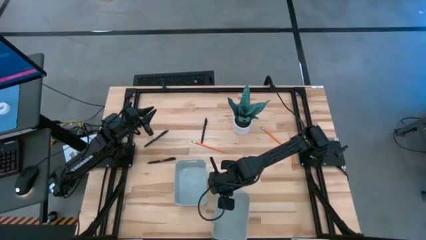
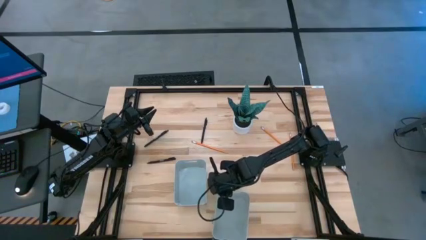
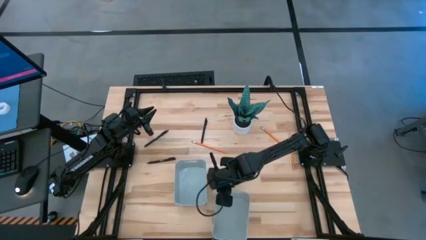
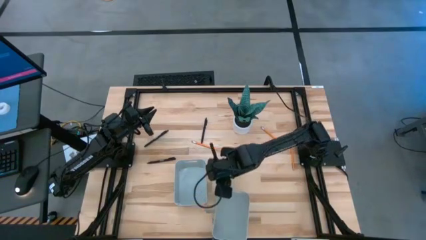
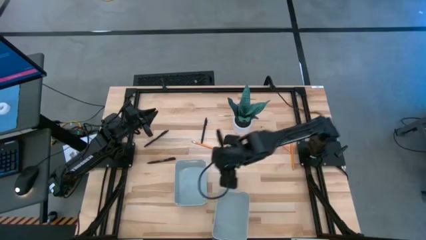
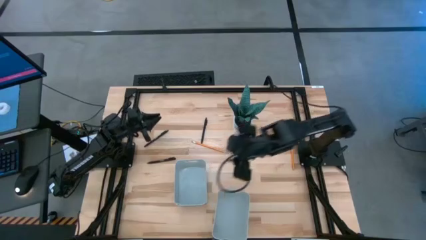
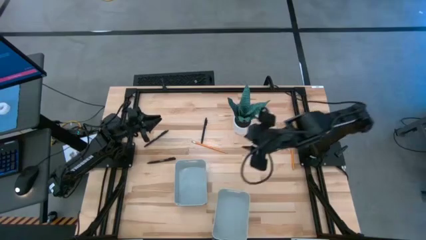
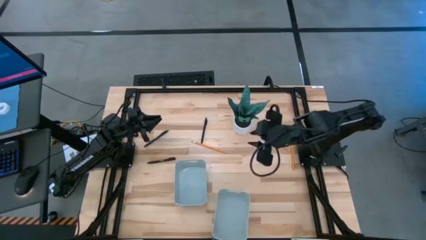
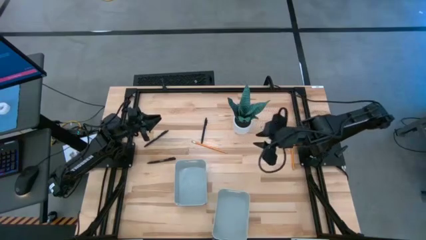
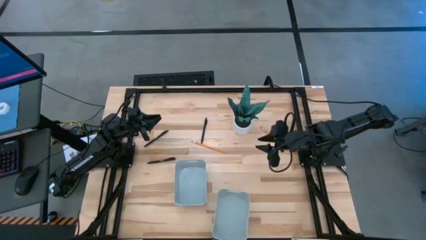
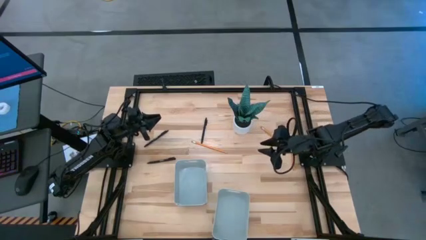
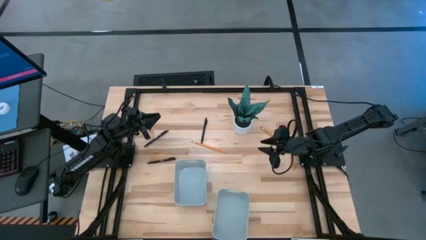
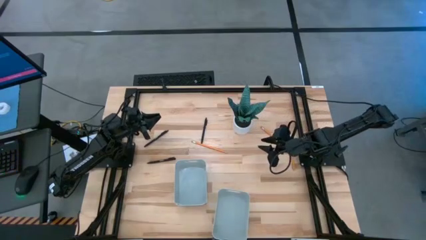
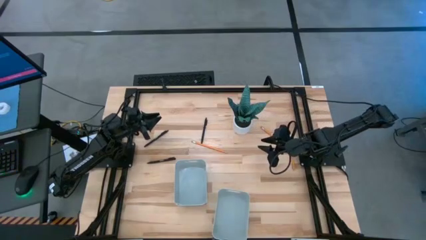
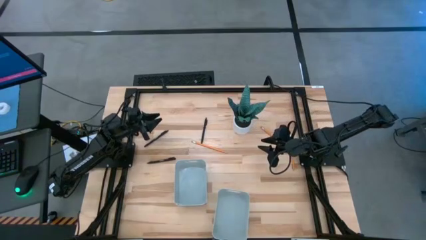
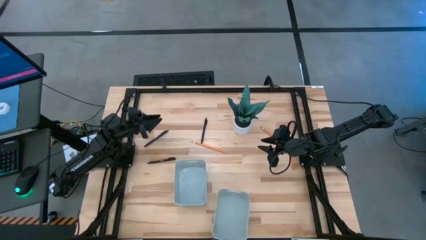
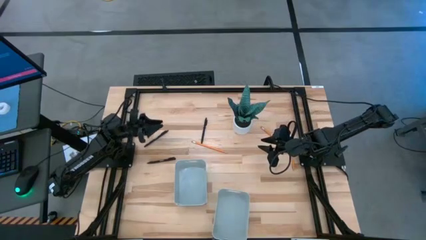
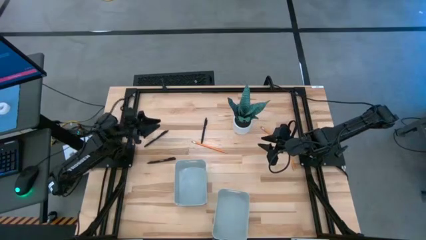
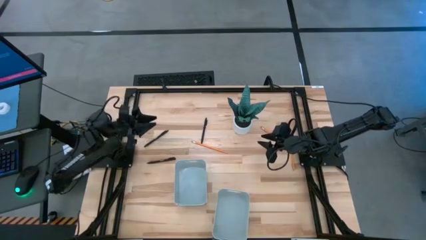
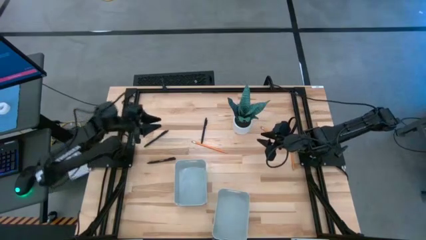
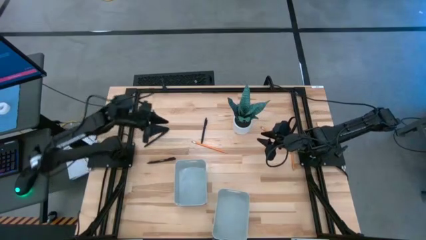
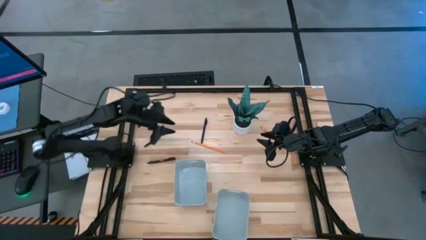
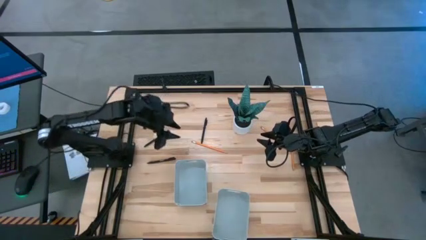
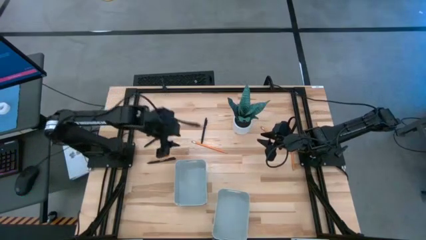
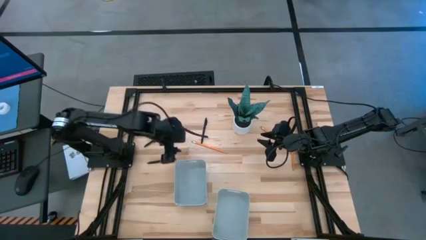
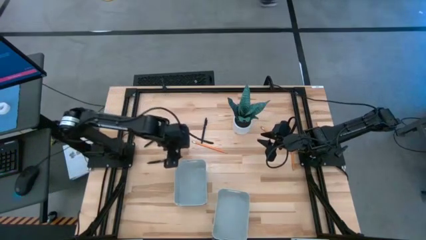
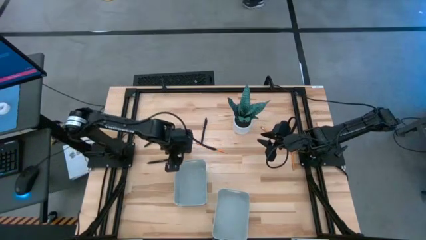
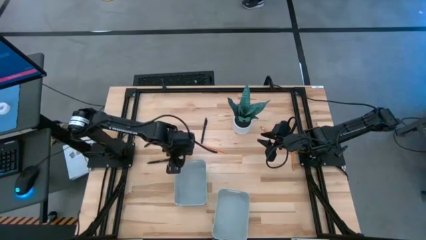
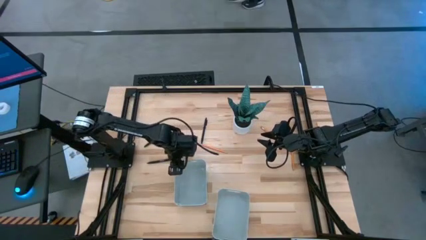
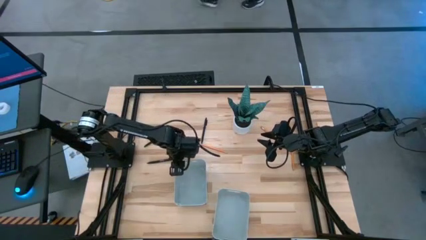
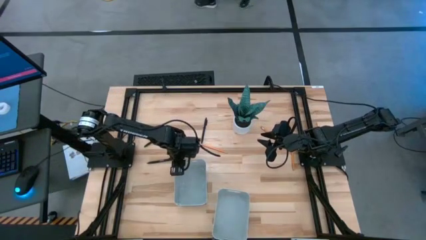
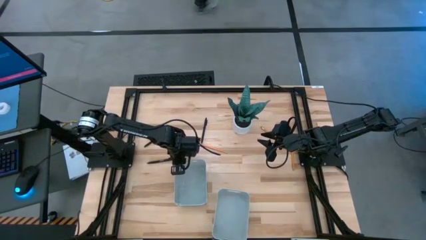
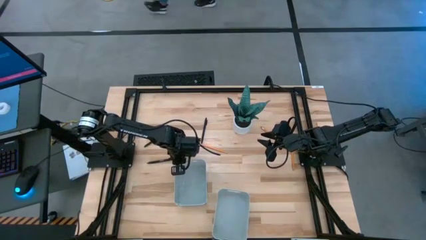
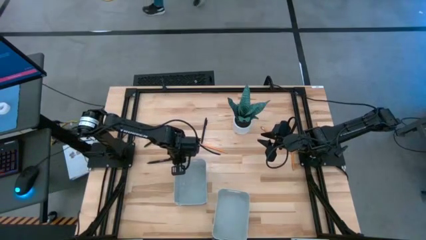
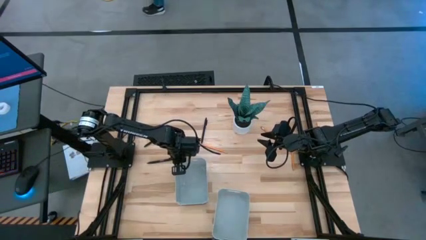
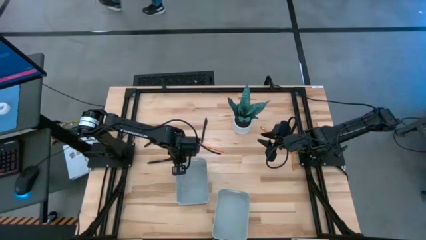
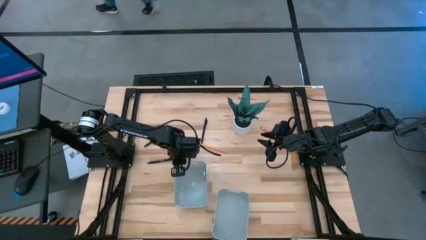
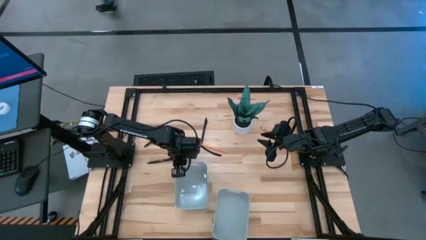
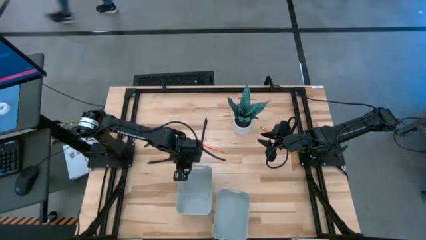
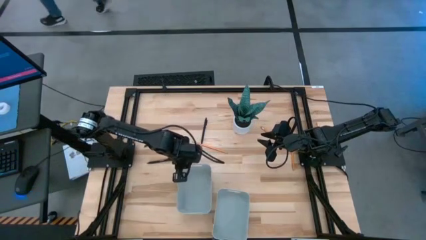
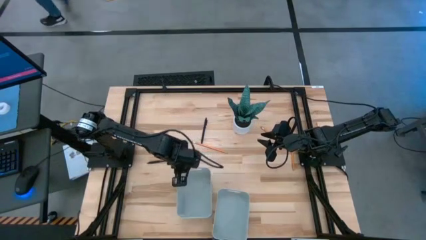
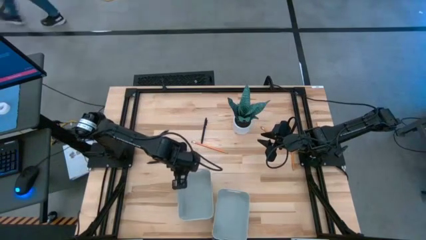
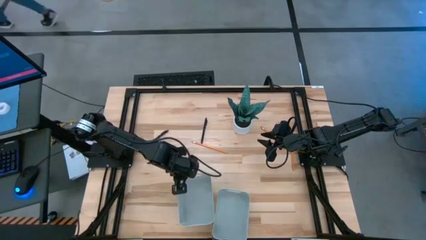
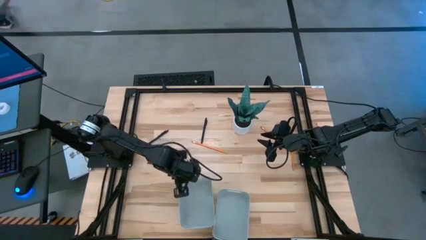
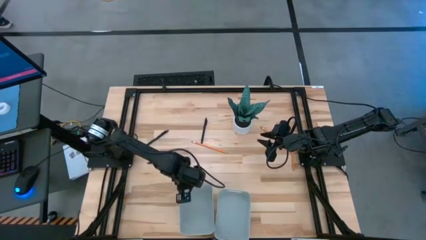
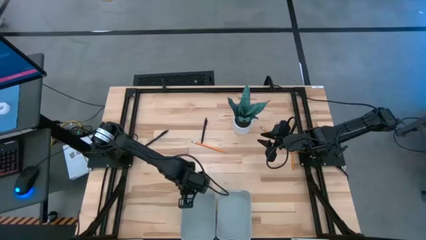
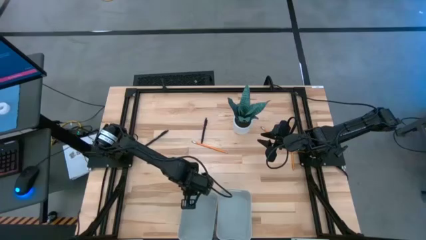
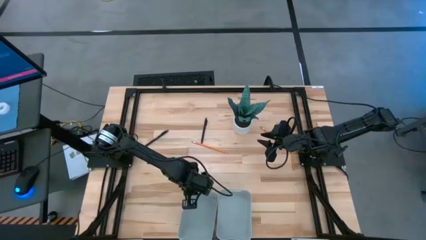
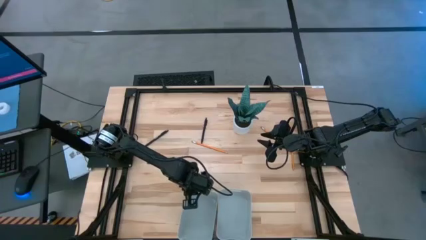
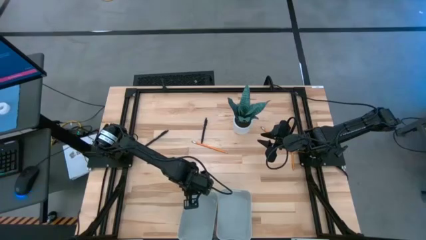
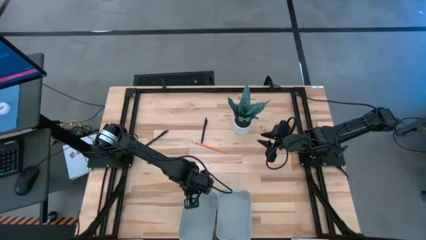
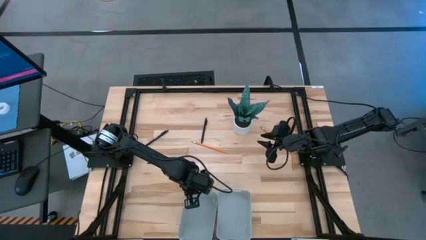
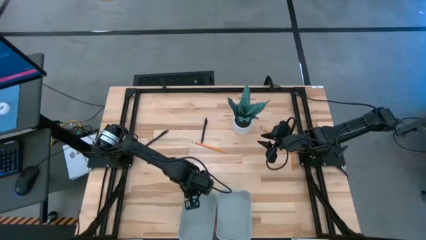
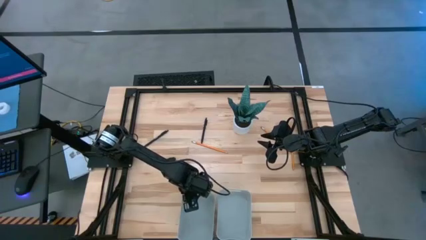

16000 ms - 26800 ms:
Task: Sort pens & pencils
Move the left gray bin to the left of the right gray bin

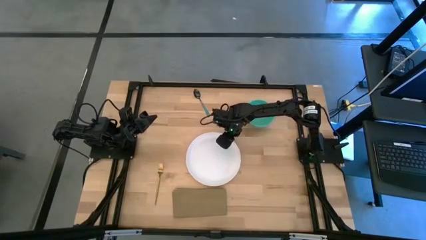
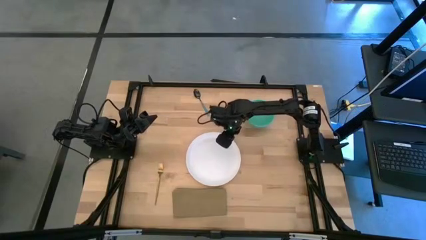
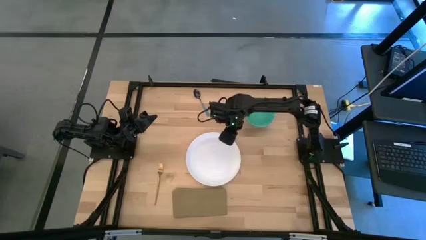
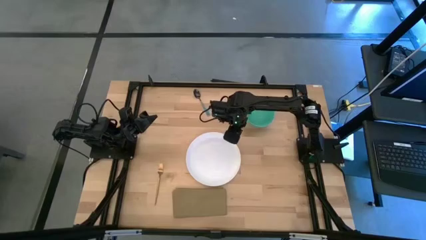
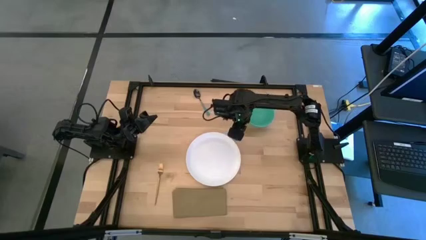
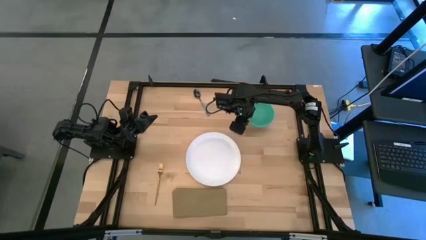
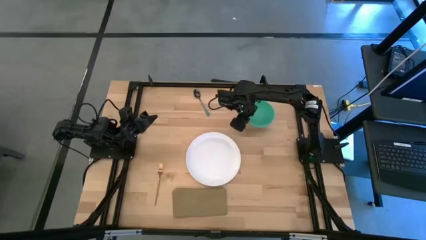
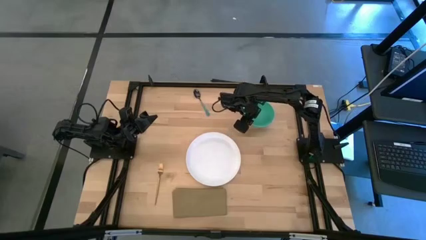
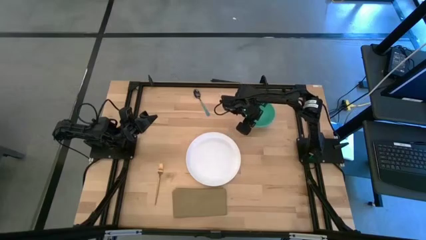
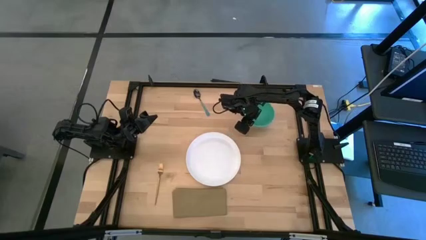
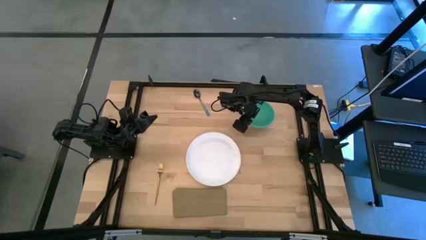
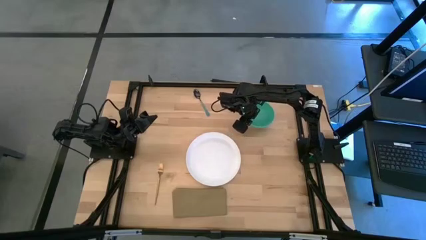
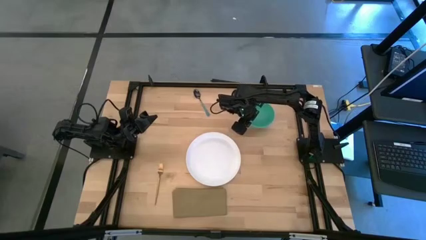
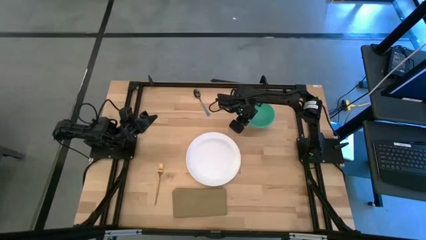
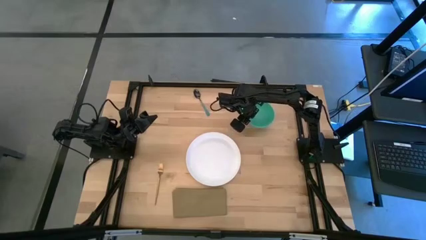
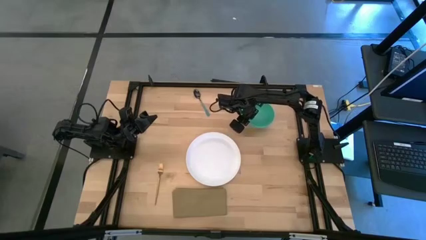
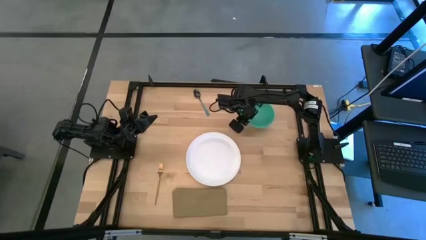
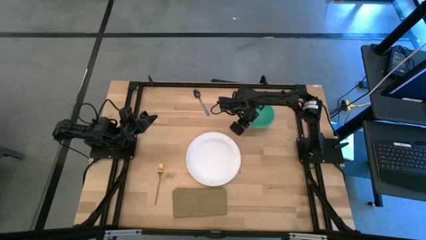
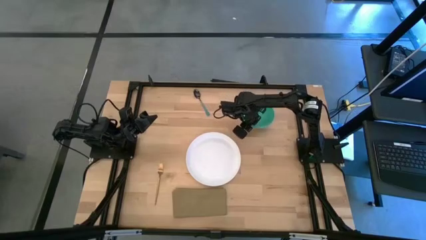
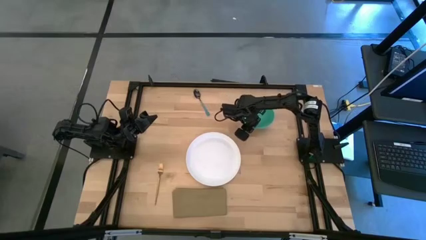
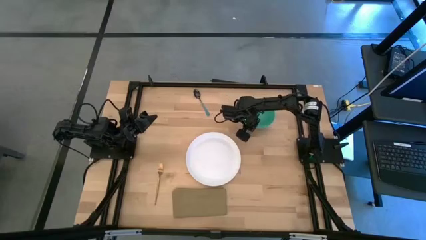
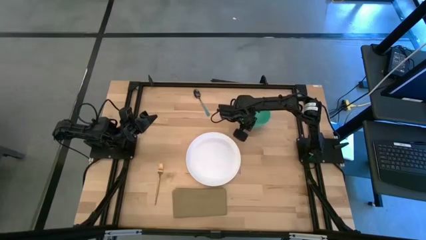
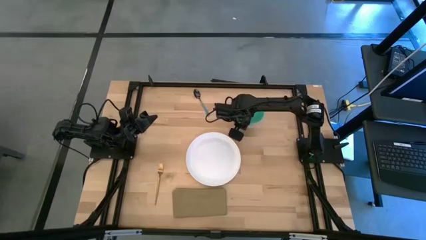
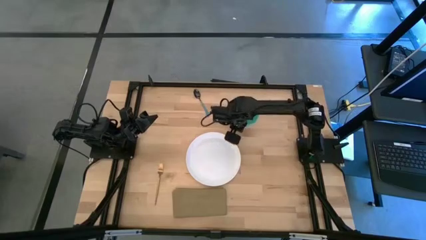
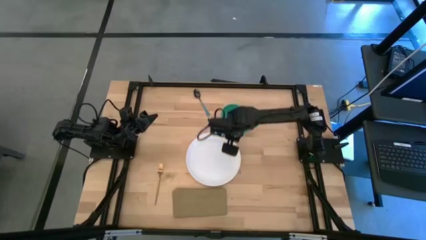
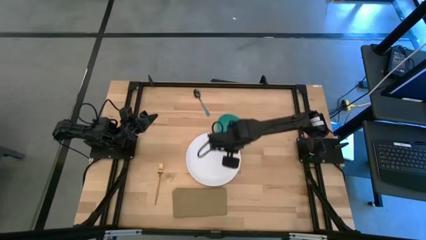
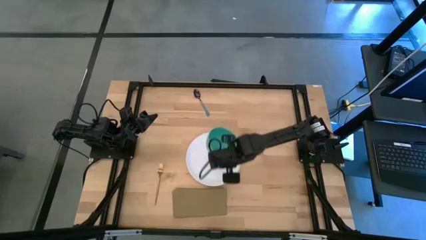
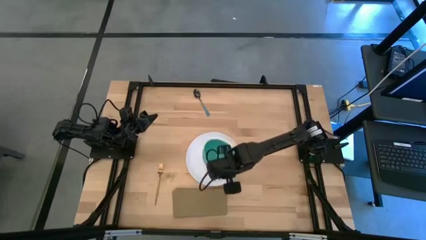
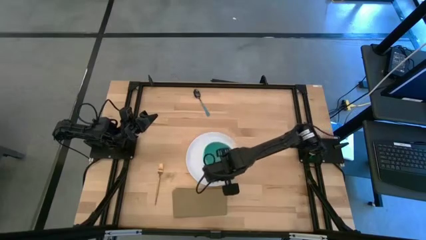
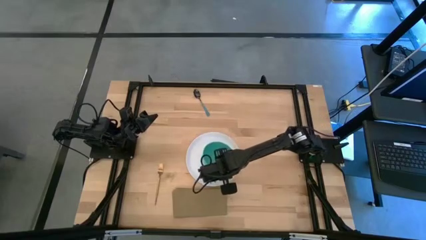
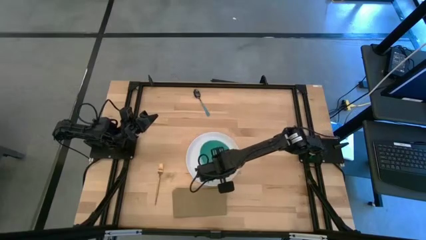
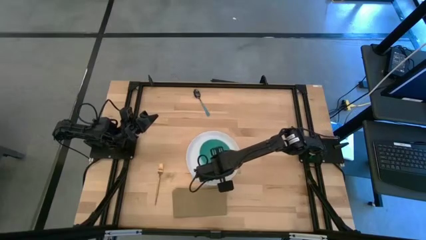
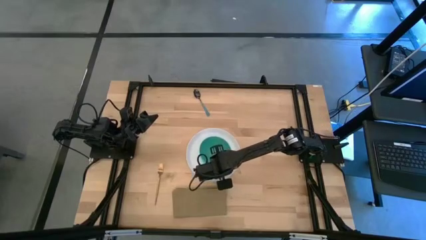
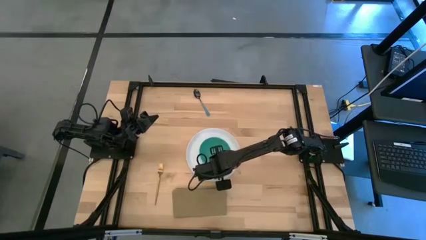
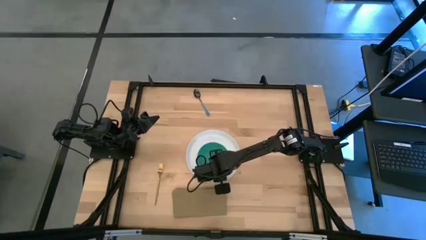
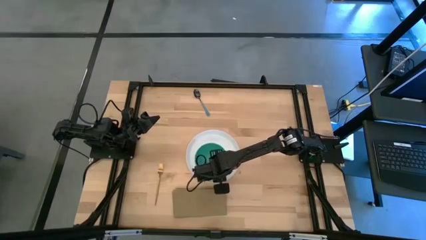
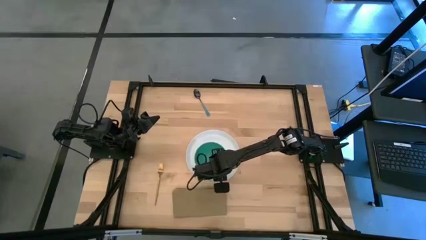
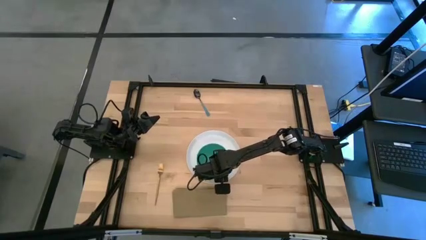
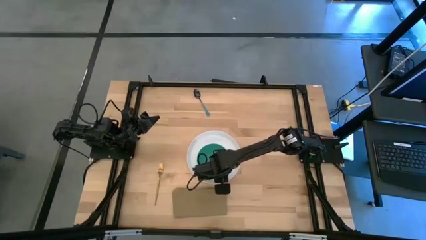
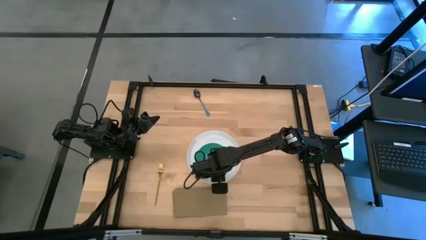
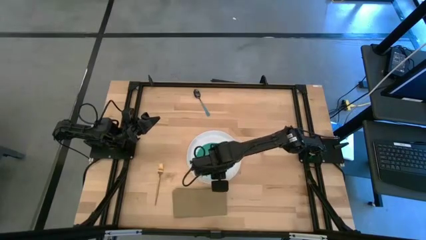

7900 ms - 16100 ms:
Task: Set table place
Put the blue bowl on top of the white plate
